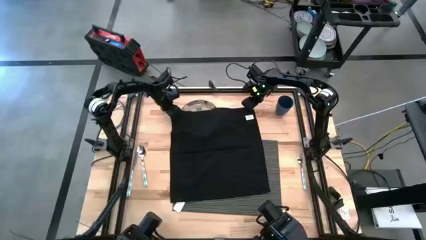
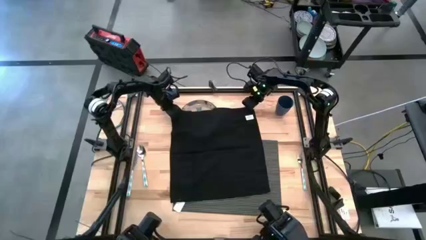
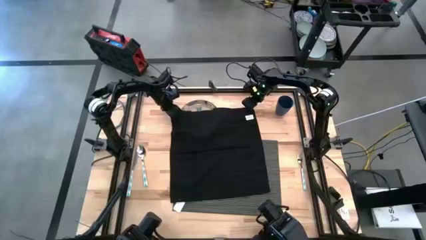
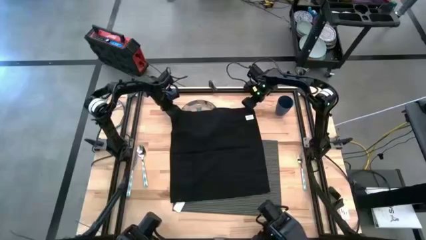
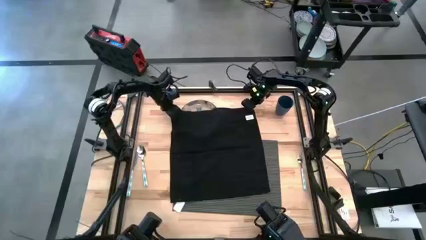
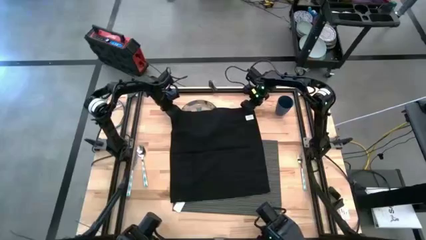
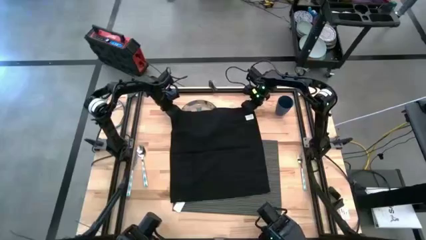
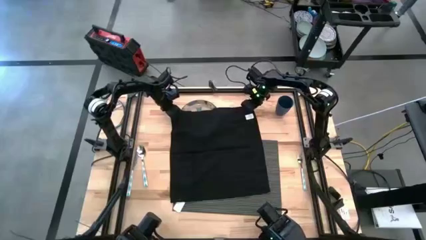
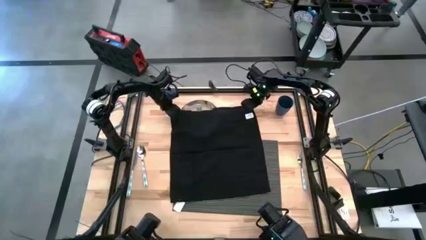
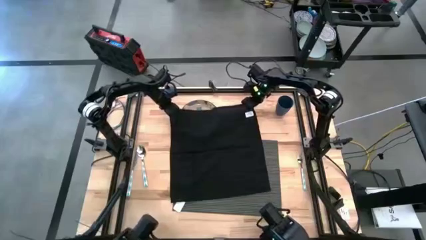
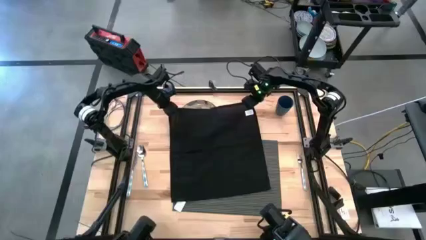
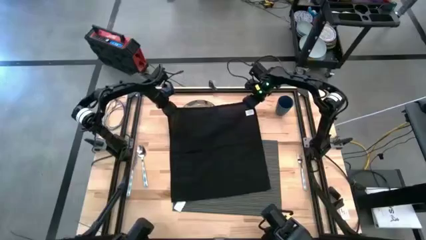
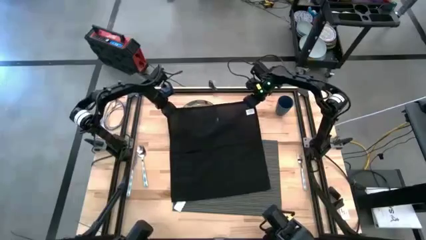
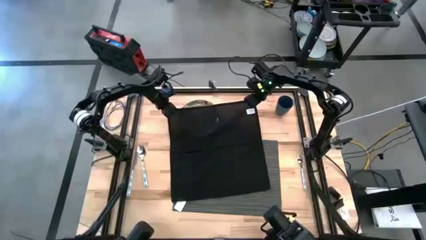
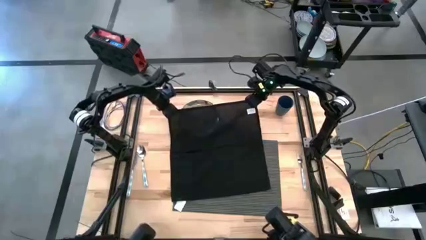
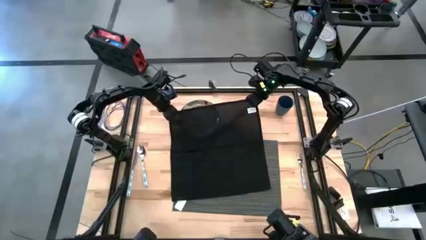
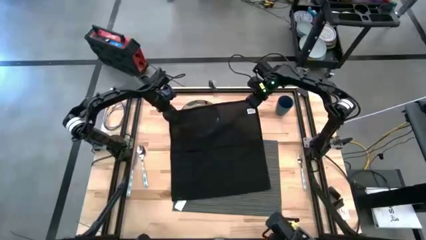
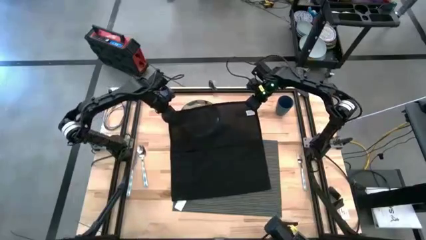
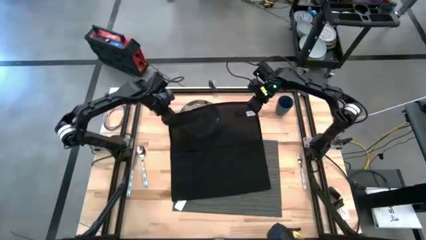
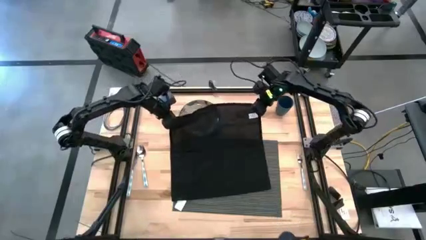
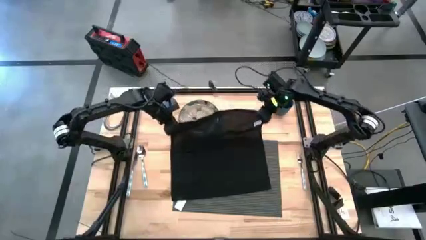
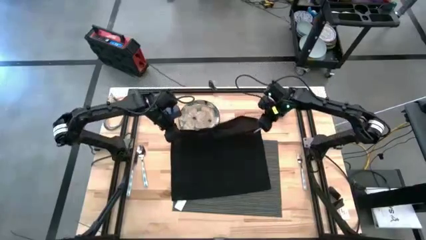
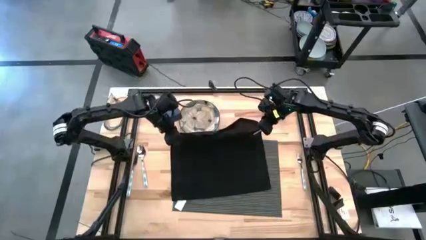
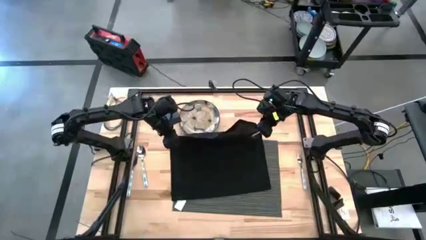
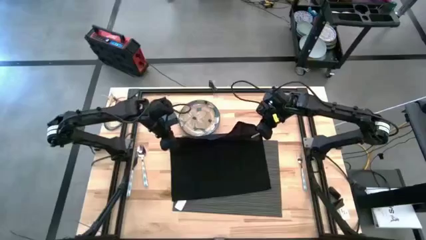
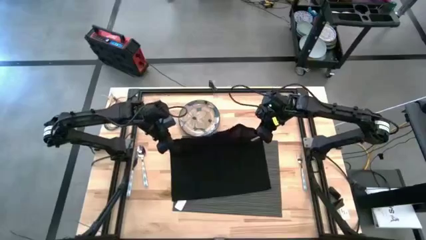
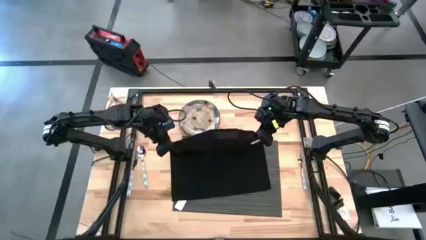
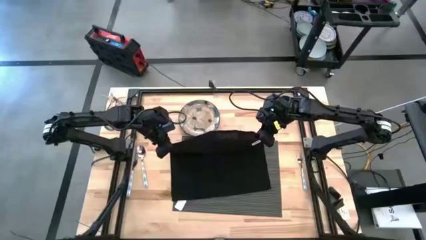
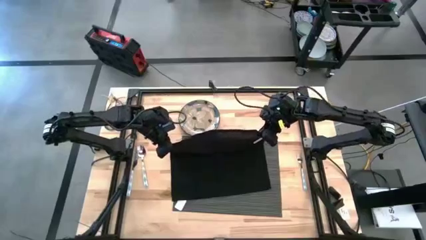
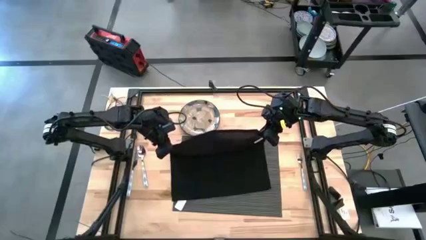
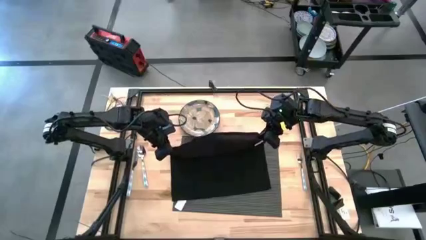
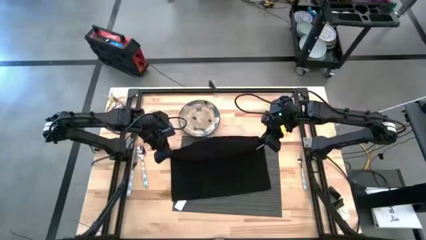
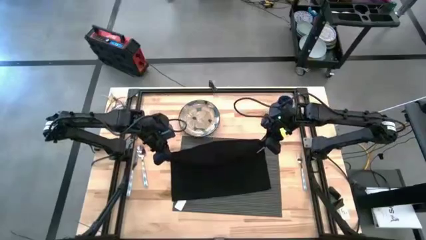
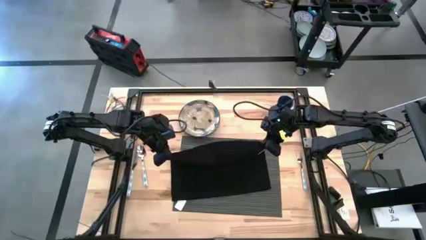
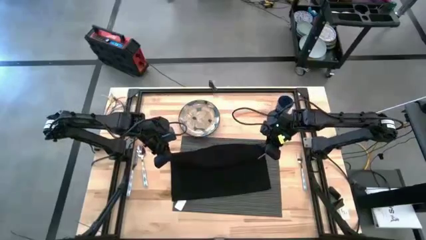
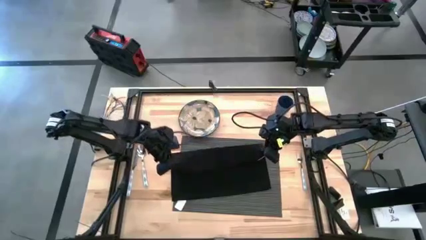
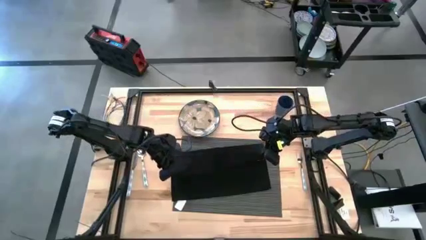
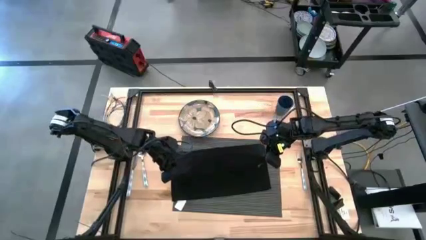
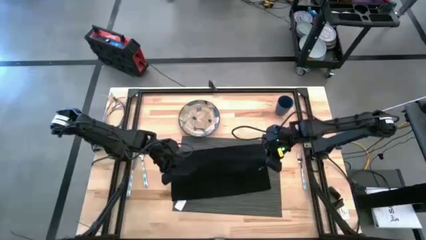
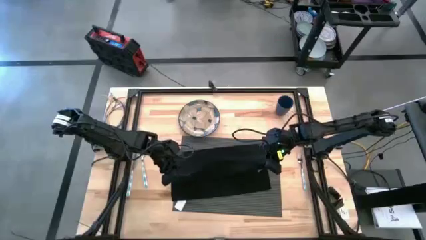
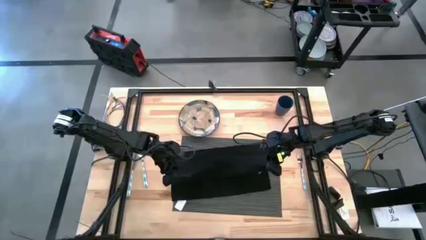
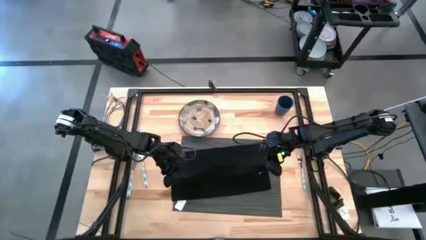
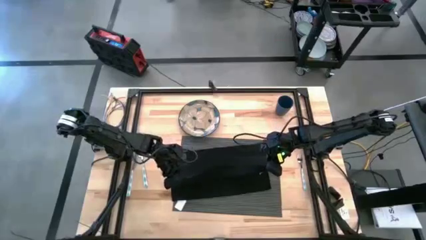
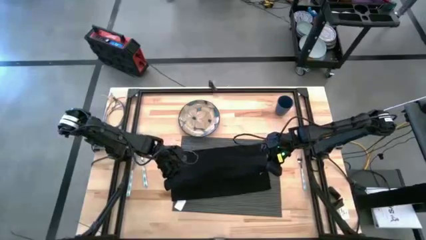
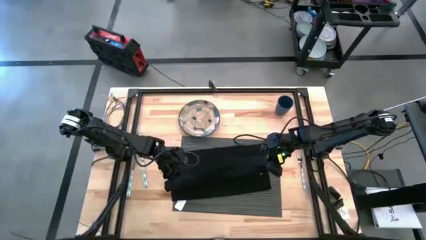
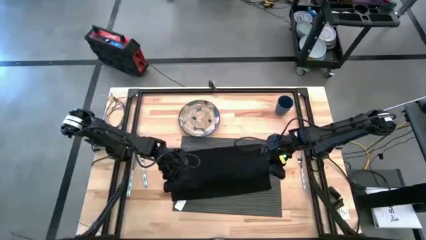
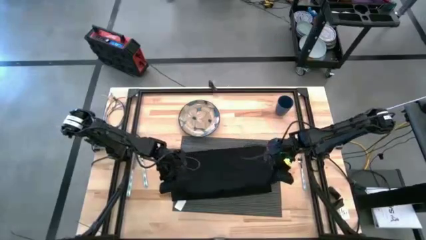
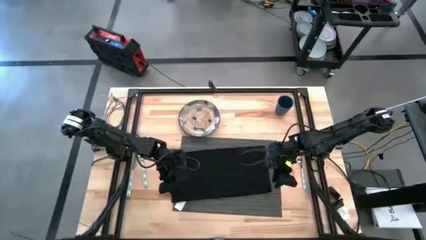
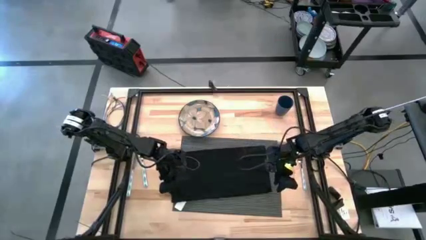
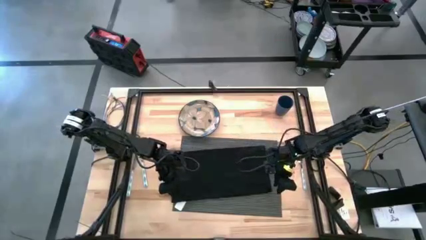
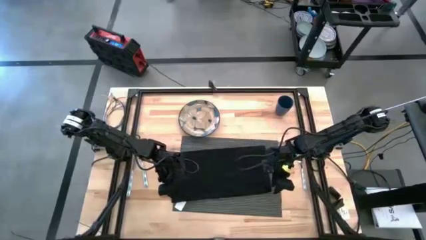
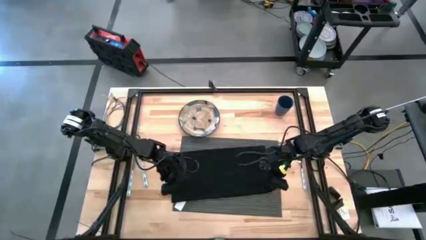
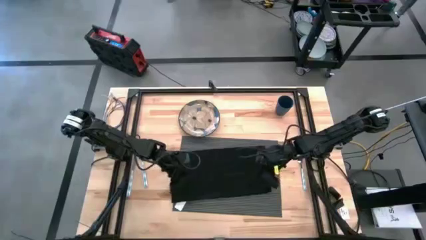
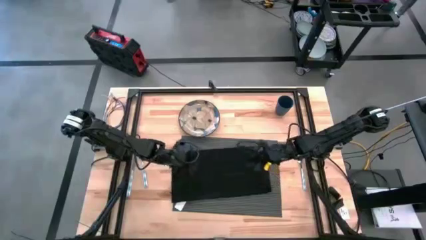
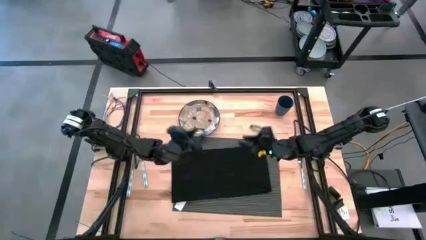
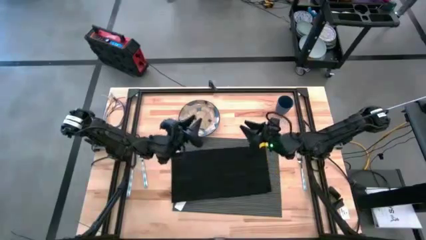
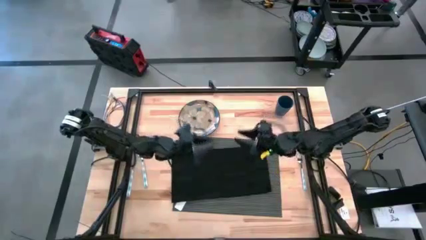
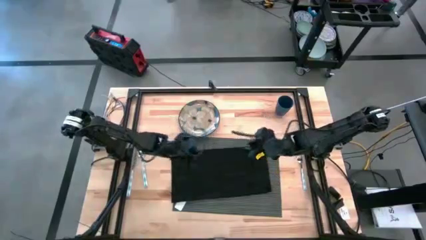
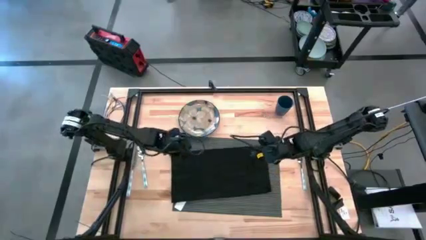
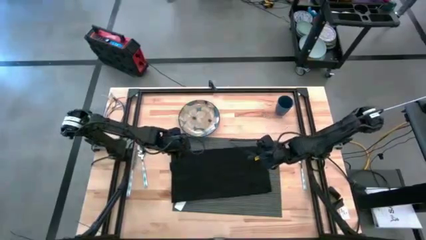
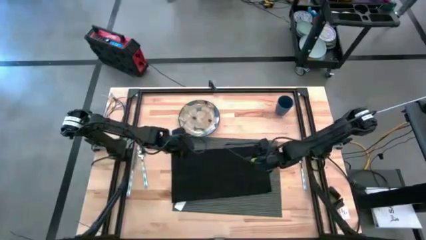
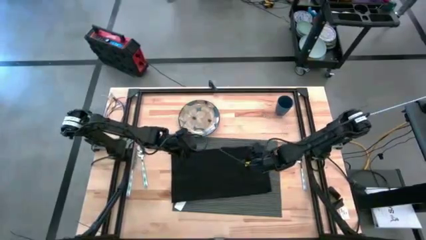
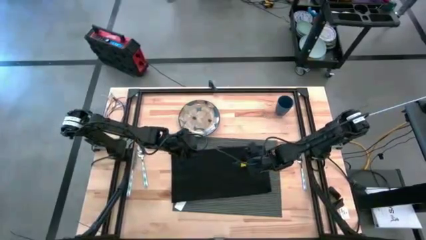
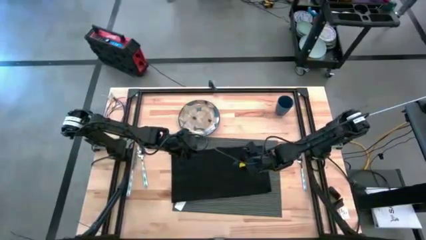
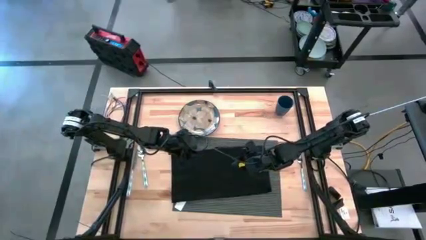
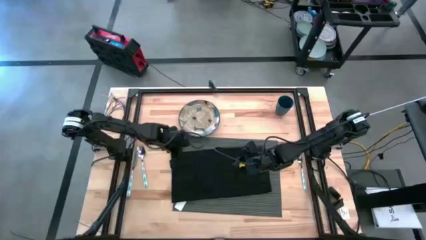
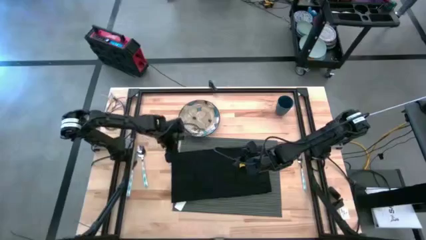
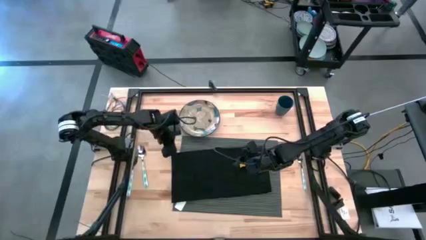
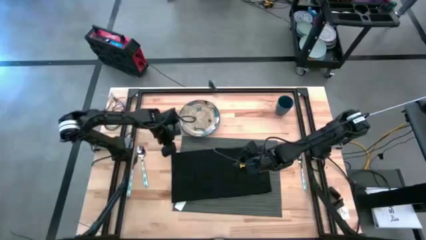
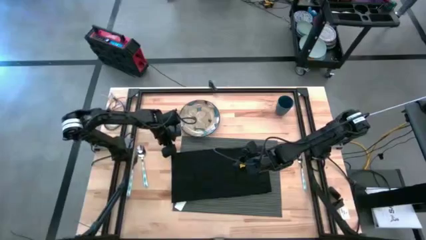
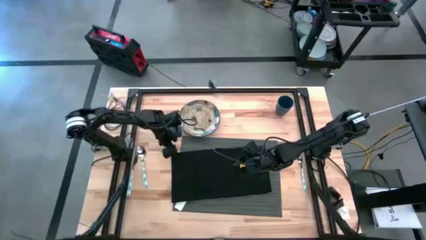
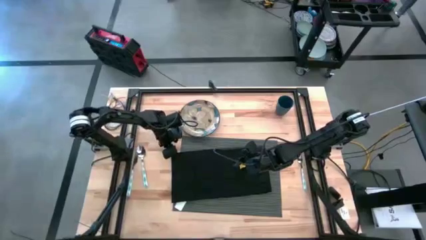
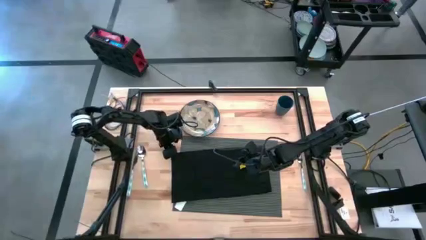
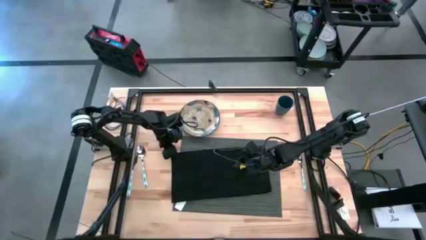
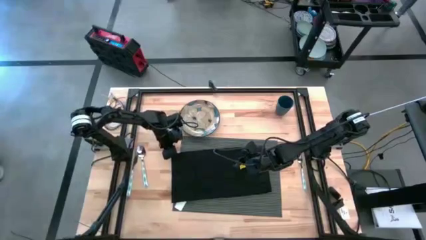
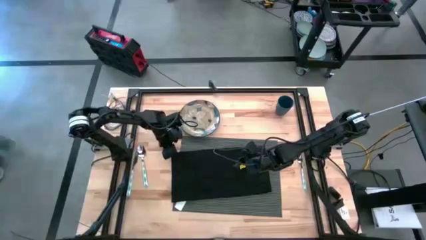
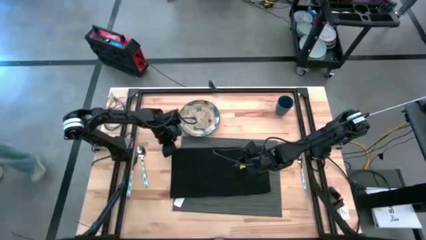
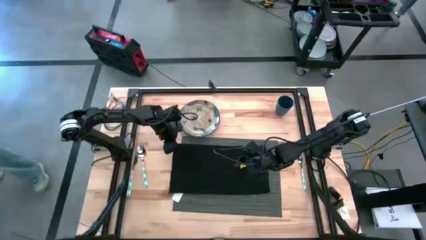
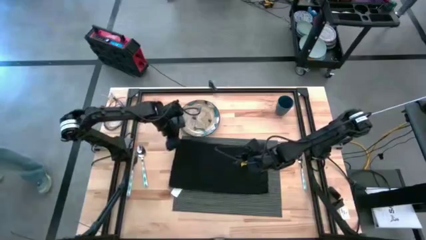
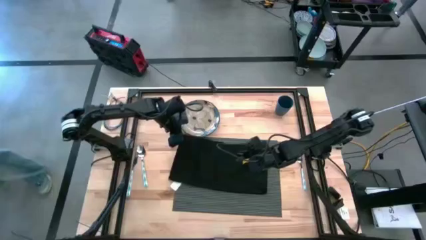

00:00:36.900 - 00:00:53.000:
Task: Set table place
Fold the black napkin

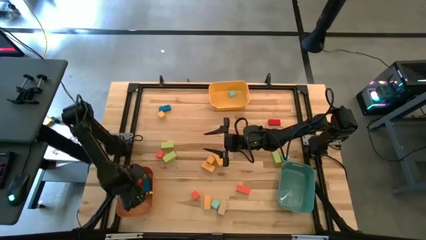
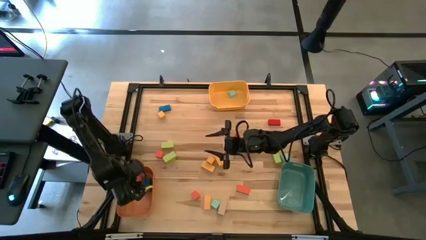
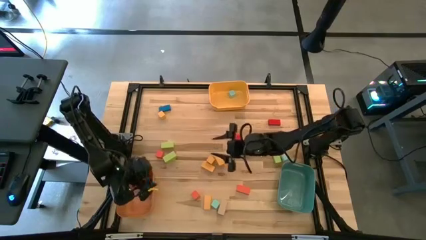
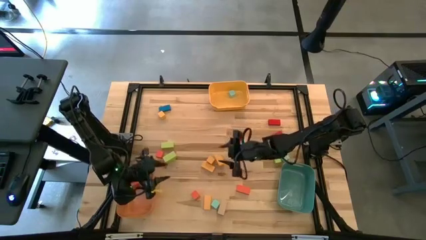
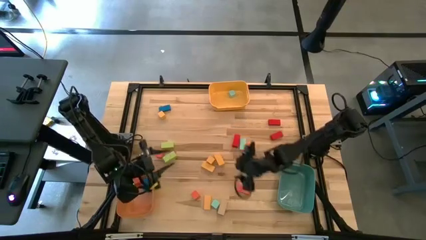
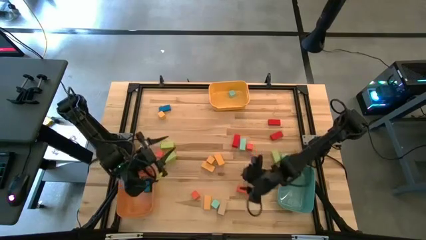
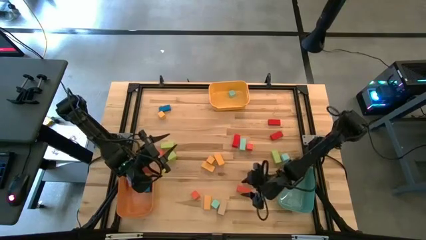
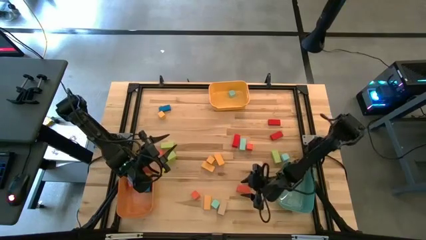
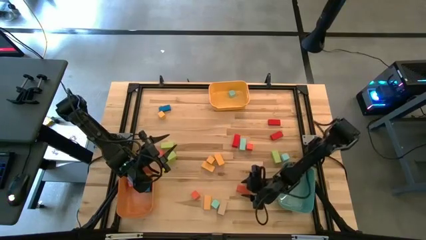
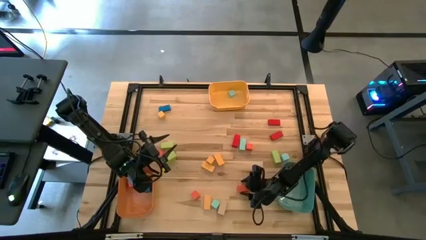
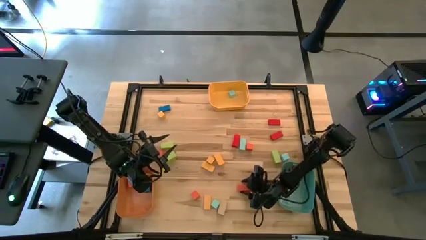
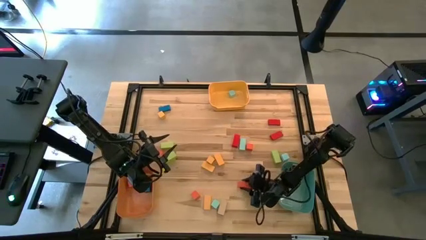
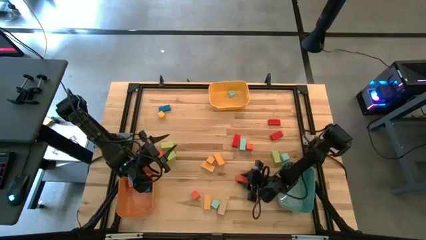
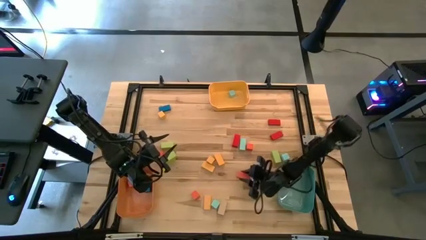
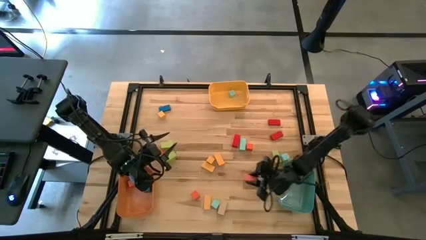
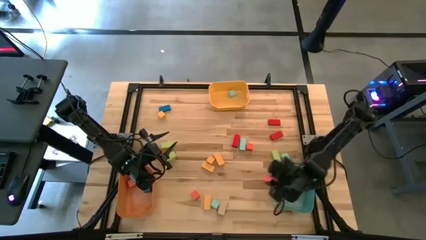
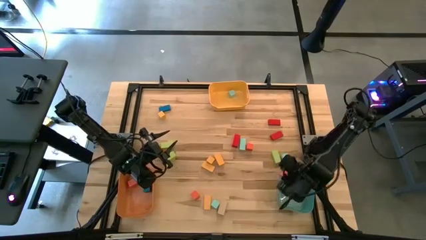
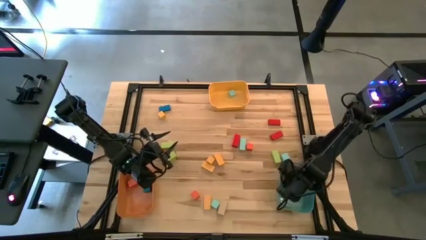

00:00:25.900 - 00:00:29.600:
Task: Sort blocks by size
Put the thin orange block into the green bin
